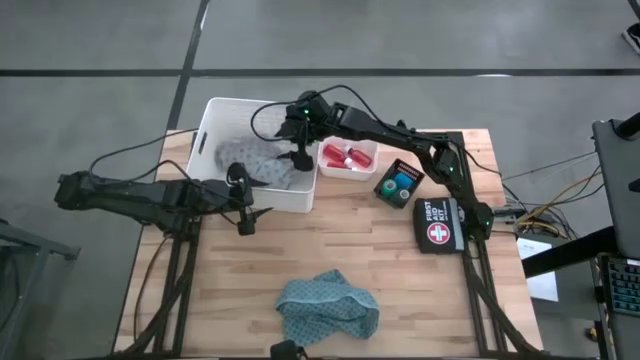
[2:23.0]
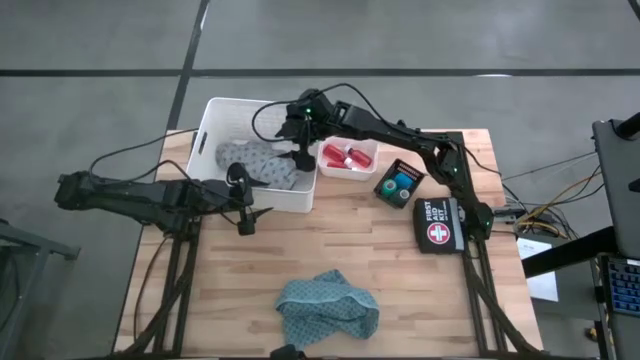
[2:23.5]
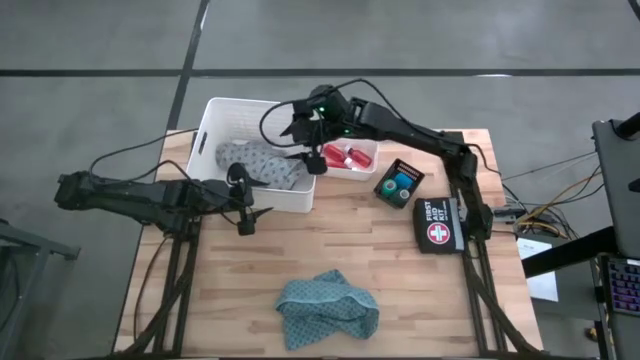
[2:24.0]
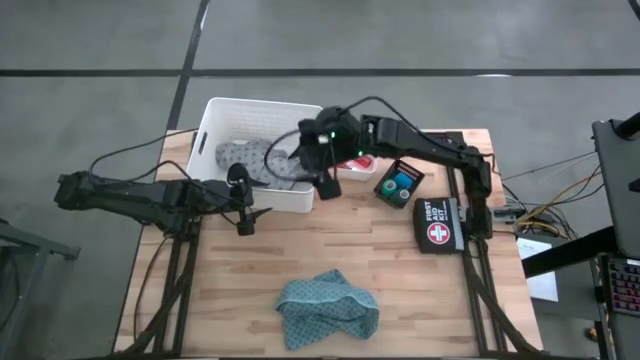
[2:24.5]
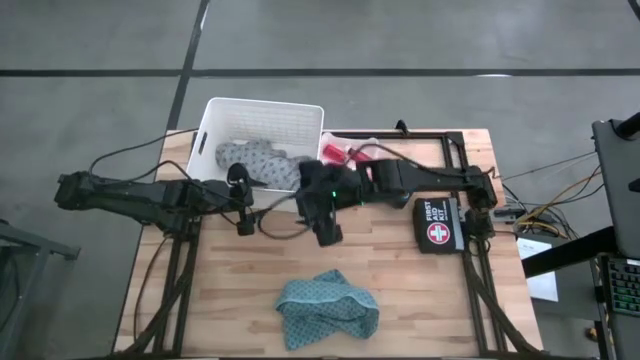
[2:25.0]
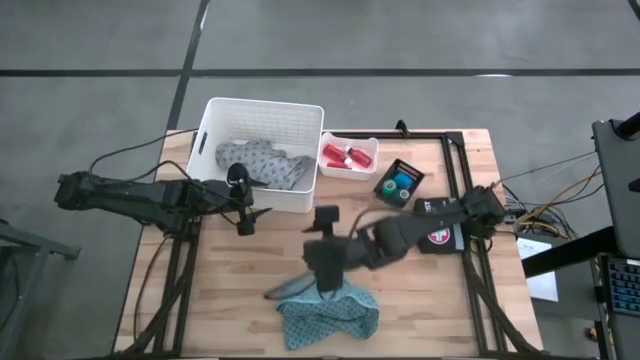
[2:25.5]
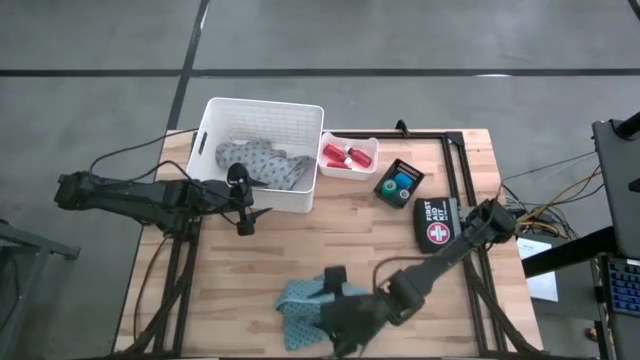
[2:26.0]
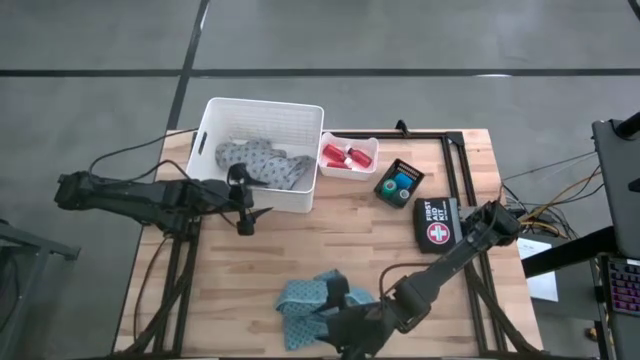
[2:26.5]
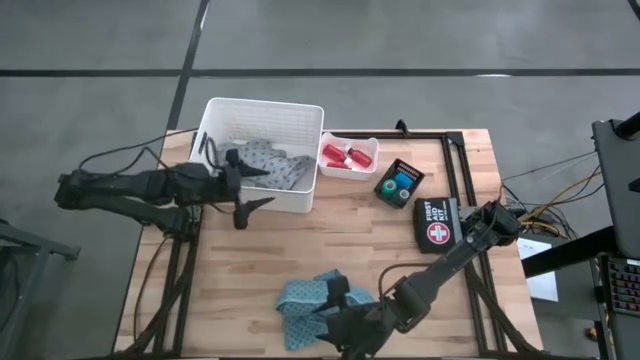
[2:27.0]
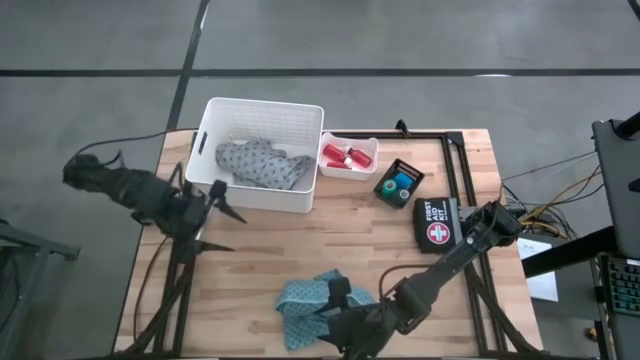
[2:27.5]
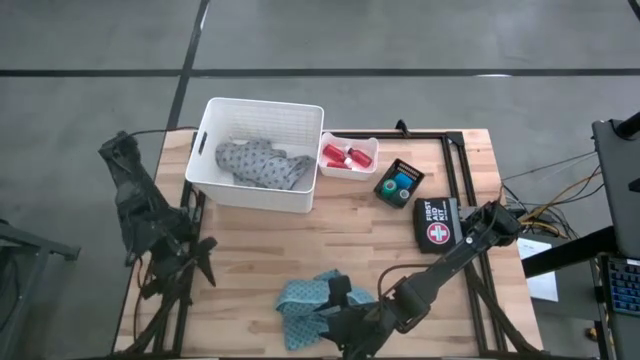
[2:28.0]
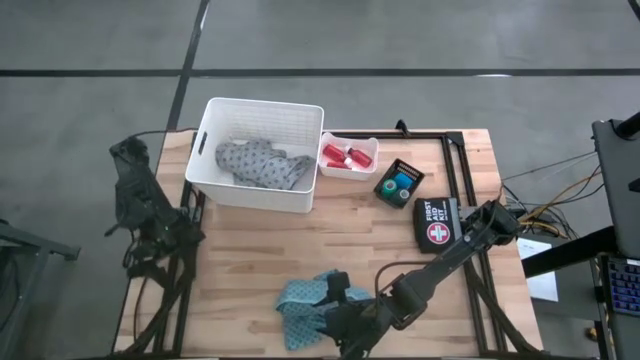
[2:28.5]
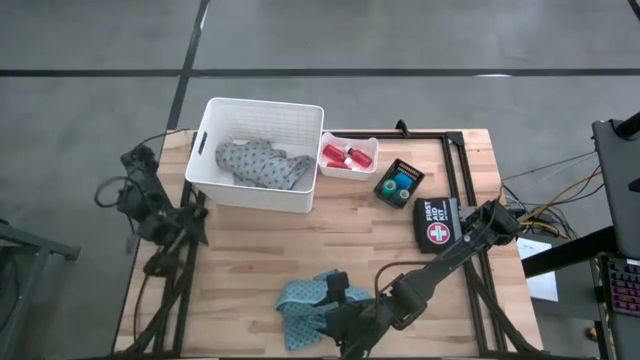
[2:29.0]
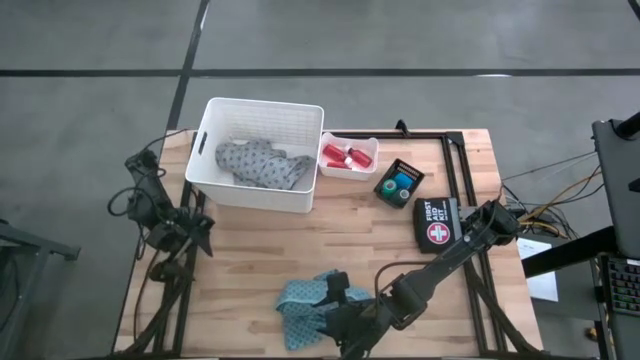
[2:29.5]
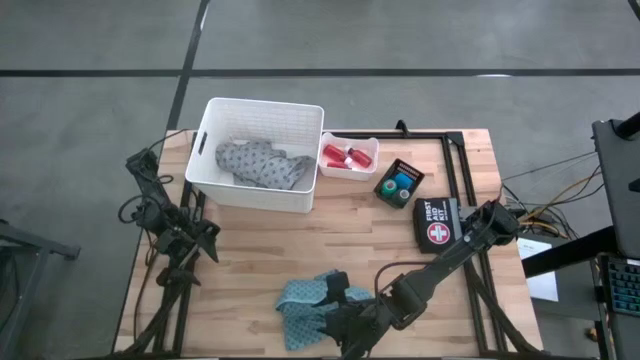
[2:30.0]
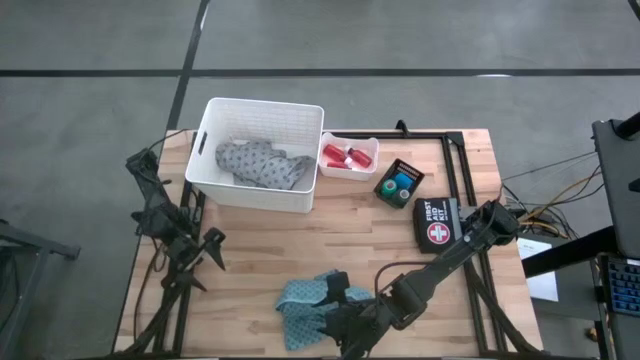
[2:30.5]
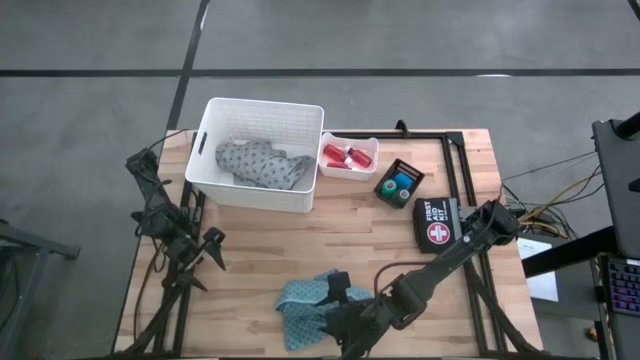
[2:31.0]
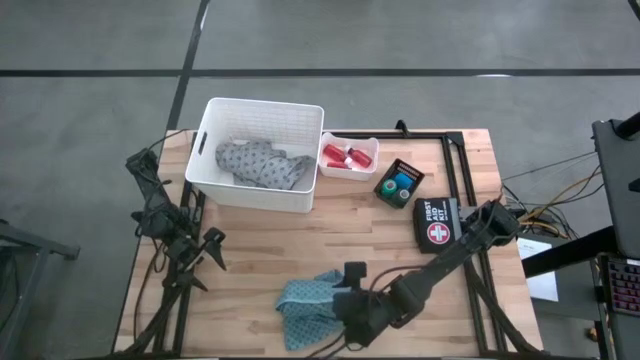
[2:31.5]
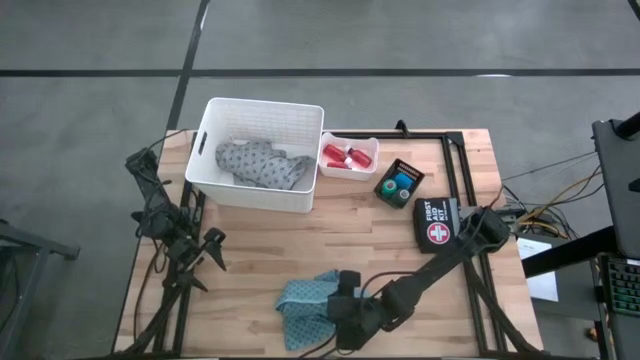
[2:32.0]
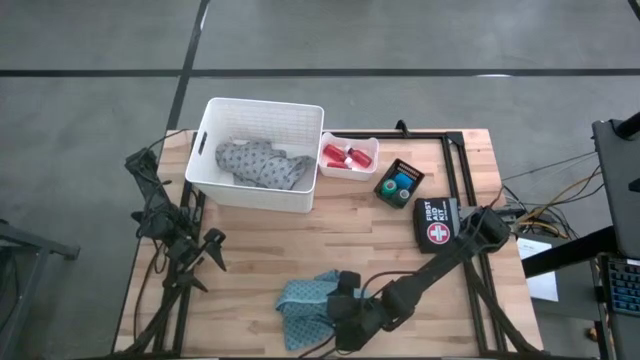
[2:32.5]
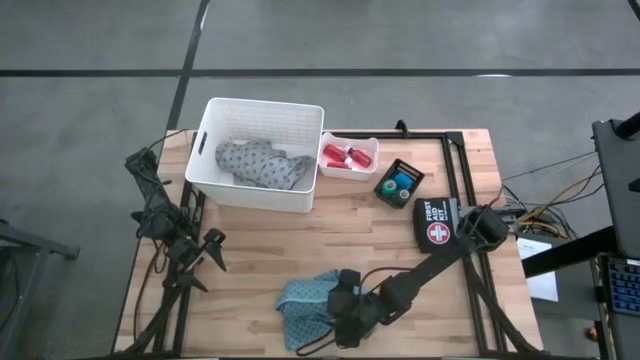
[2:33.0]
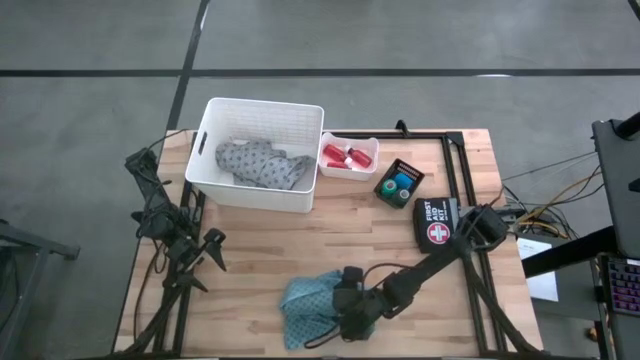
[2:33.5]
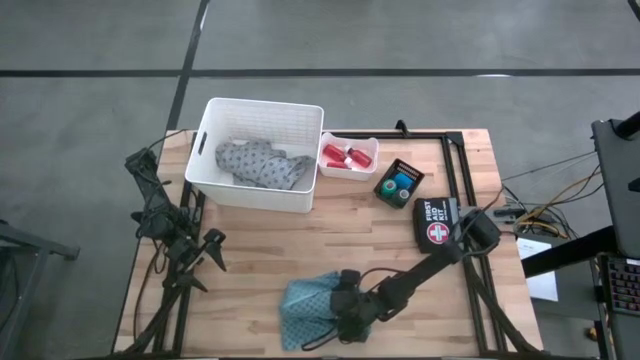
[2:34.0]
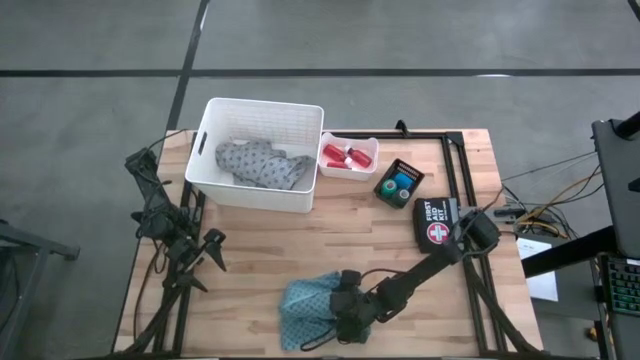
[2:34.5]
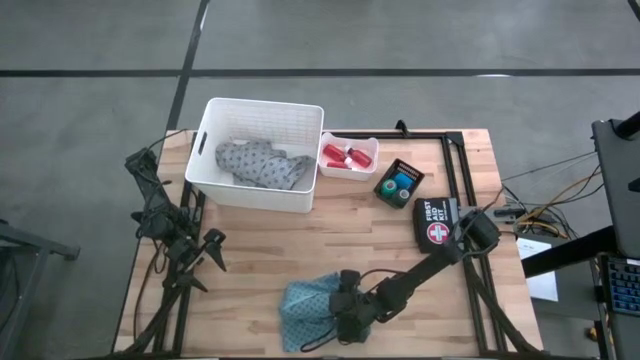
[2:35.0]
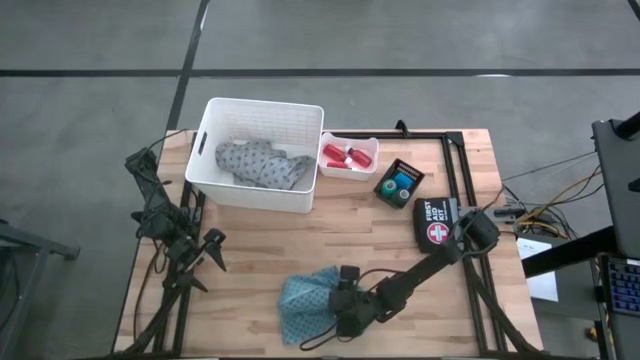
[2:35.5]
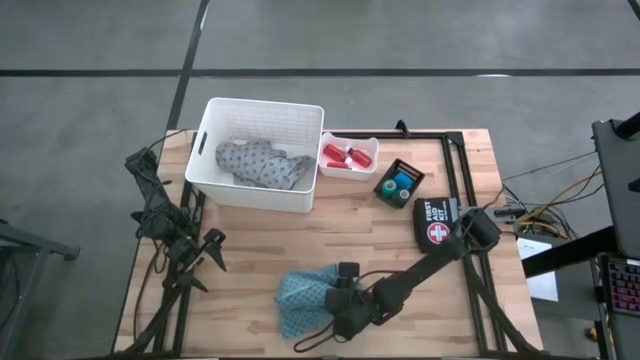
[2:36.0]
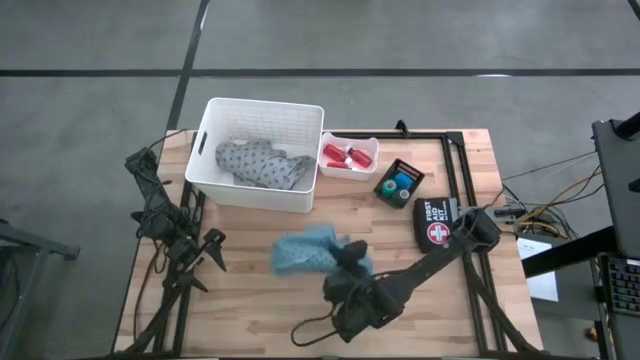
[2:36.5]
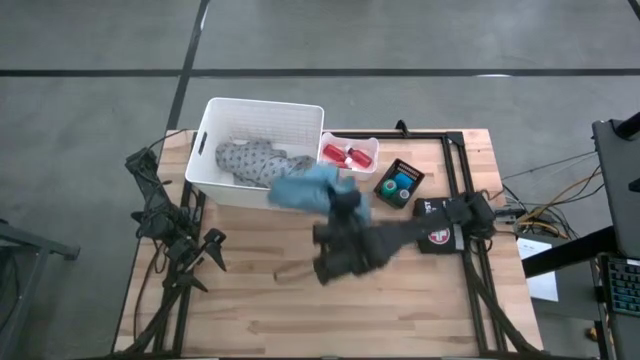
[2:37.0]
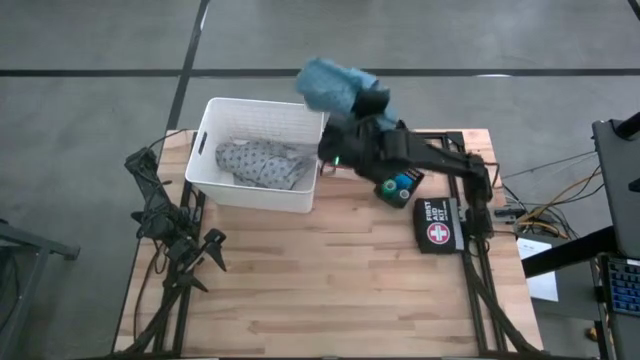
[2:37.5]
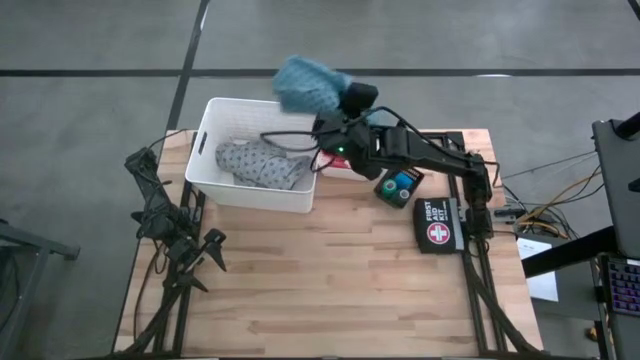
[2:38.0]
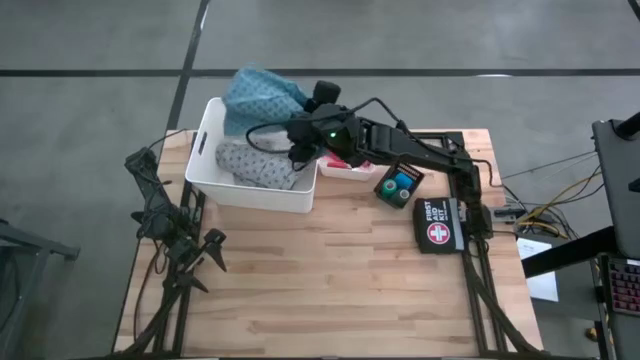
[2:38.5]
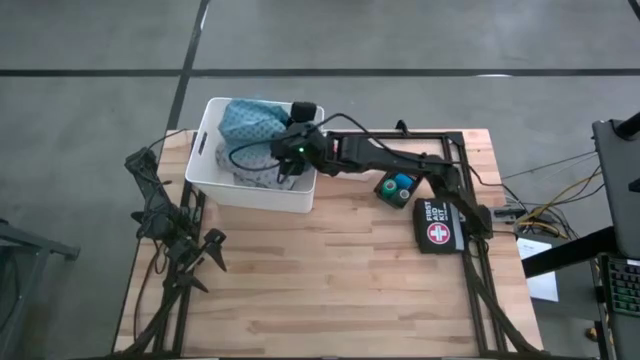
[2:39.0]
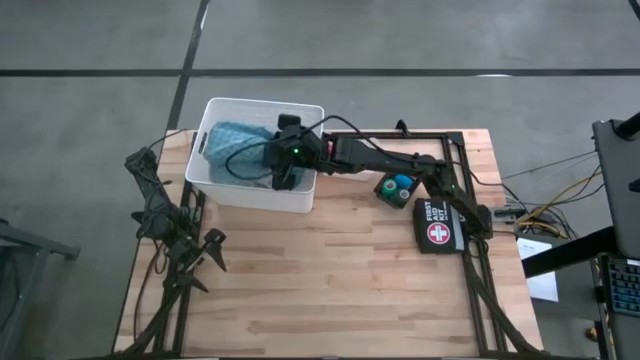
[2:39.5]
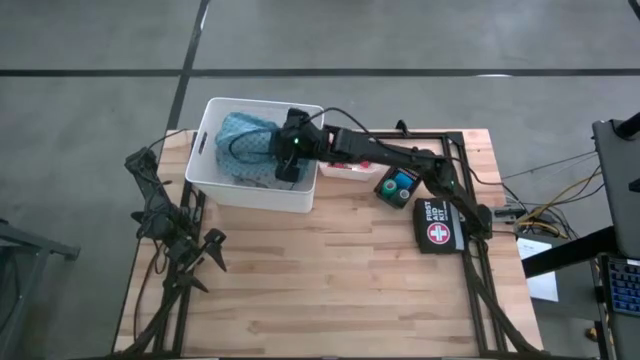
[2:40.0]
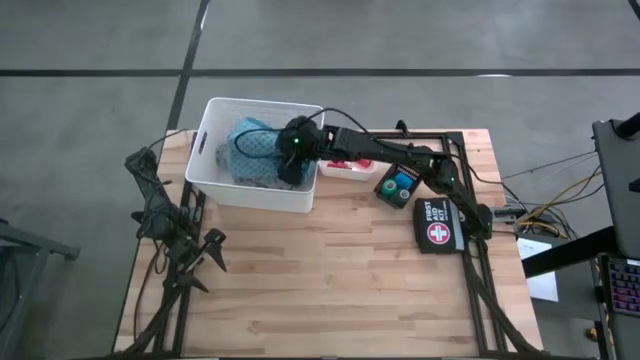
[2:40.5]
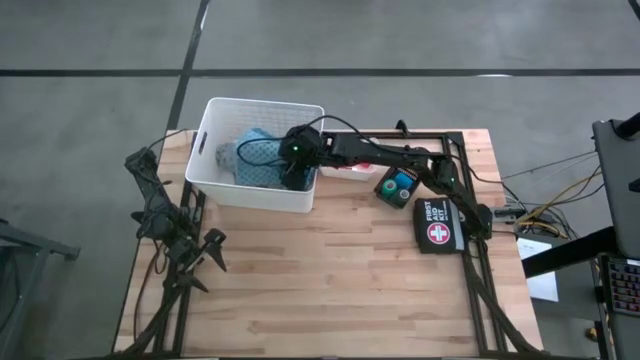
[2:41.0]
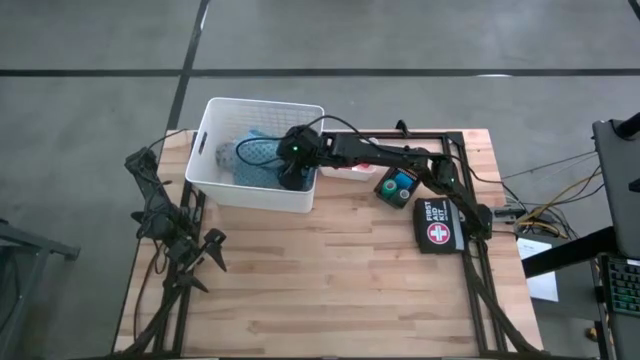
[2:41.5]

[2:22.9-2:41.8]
Task: Pick & Place Medicine items
Put the blue patient gown into the big white bin
